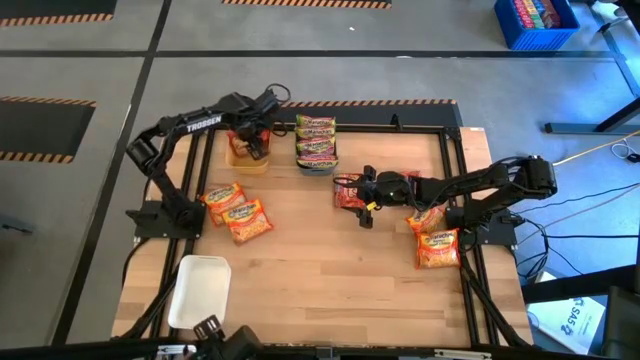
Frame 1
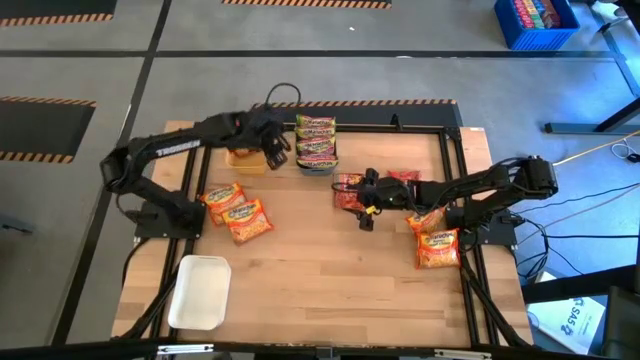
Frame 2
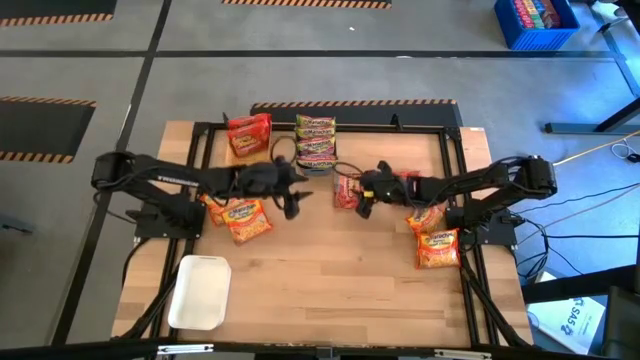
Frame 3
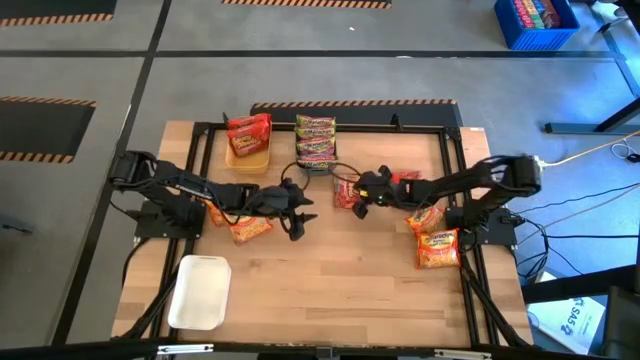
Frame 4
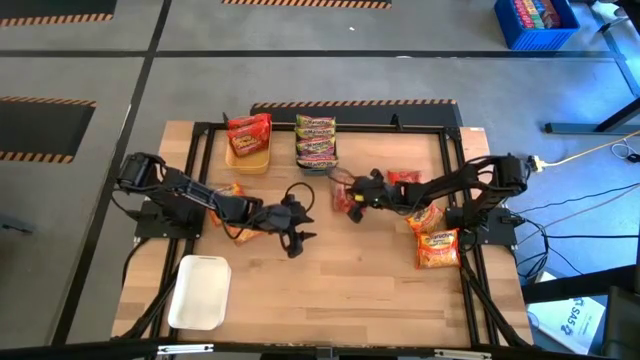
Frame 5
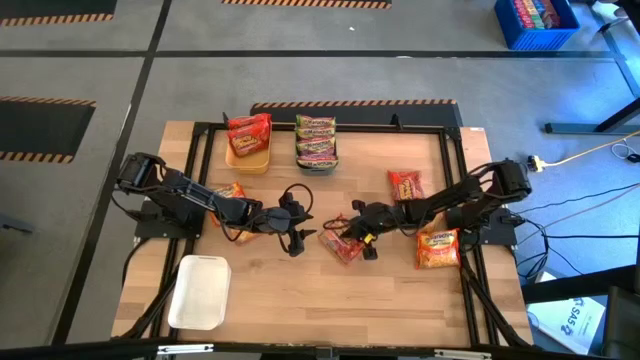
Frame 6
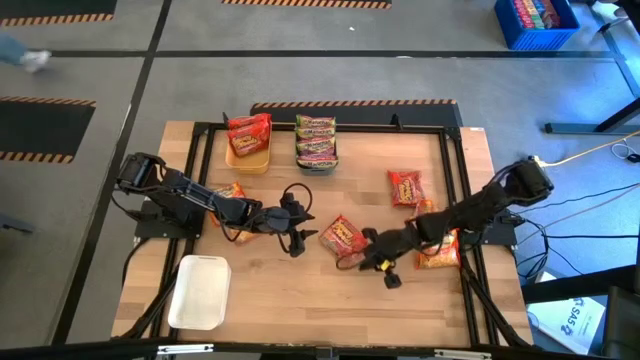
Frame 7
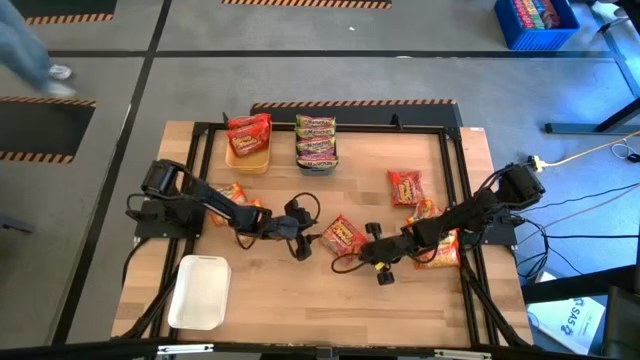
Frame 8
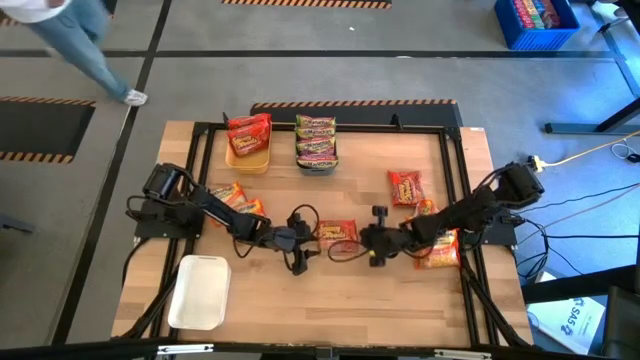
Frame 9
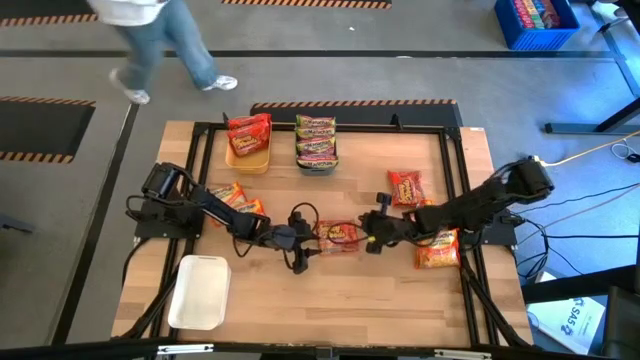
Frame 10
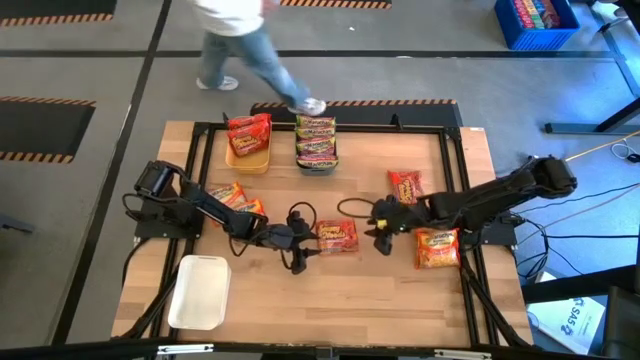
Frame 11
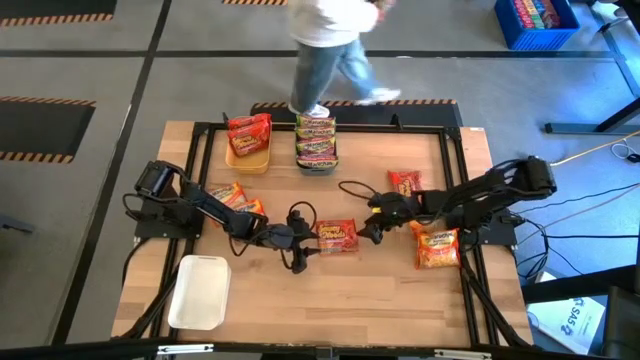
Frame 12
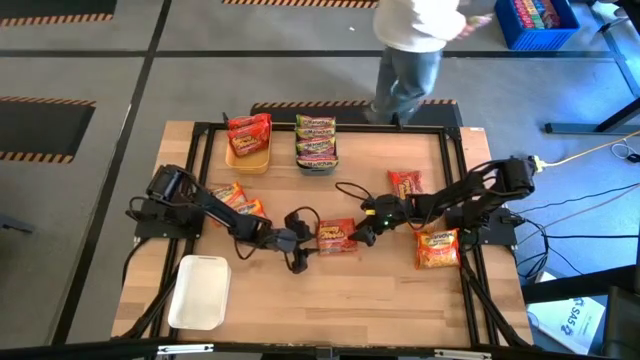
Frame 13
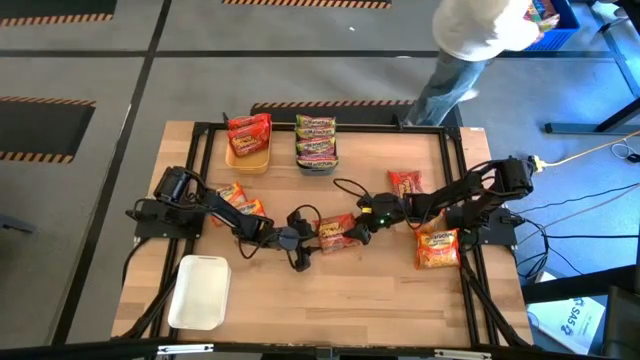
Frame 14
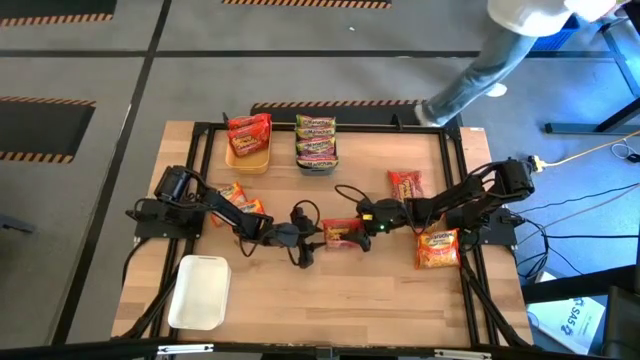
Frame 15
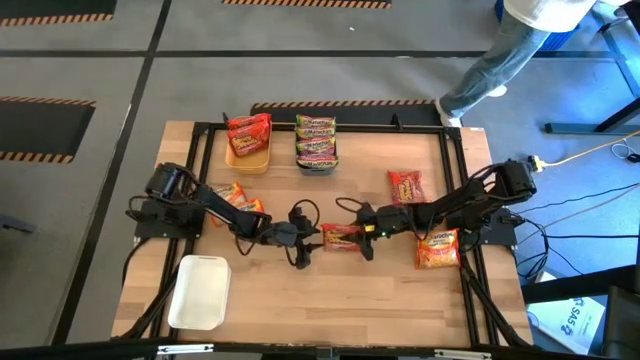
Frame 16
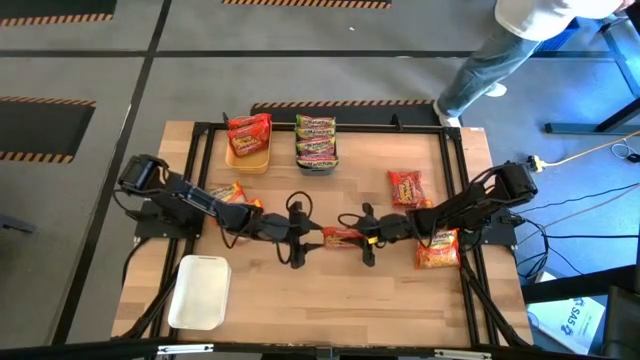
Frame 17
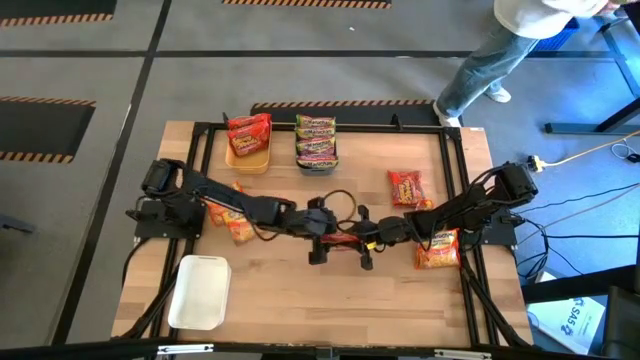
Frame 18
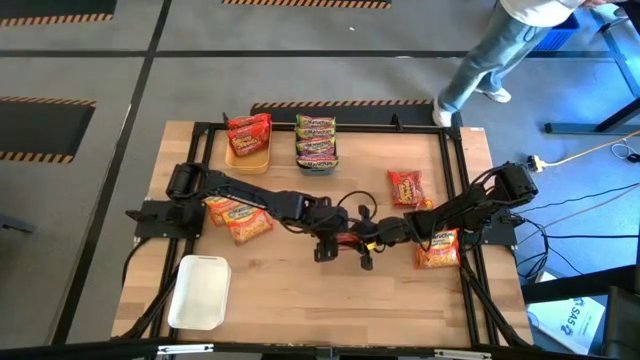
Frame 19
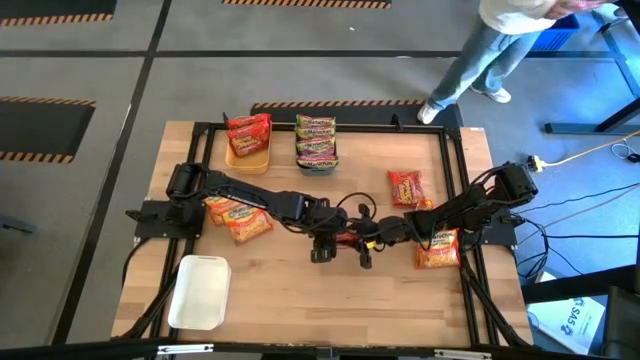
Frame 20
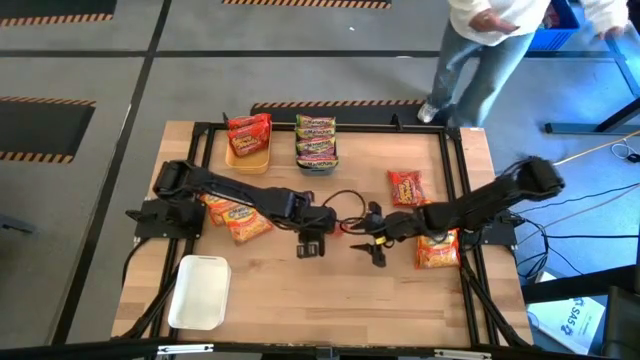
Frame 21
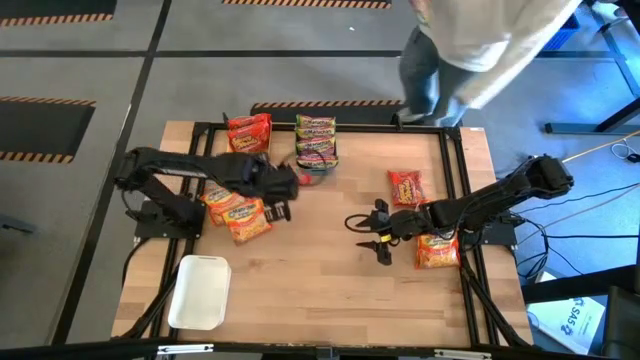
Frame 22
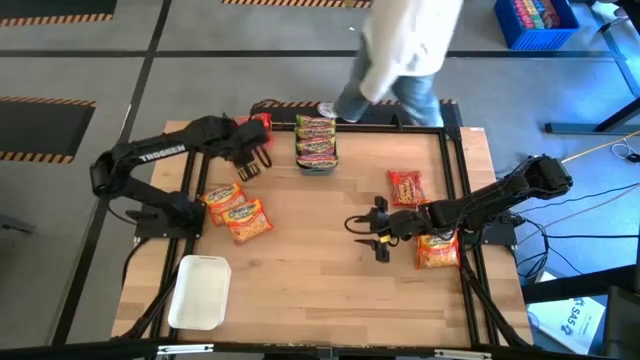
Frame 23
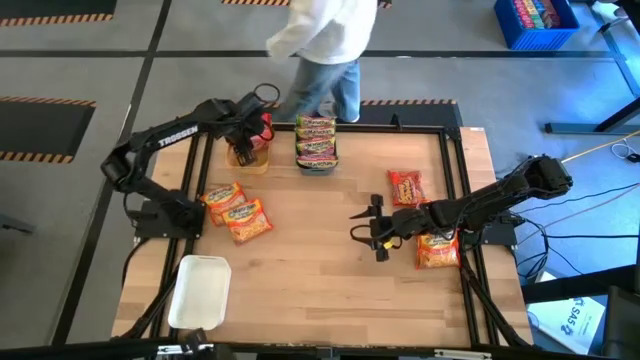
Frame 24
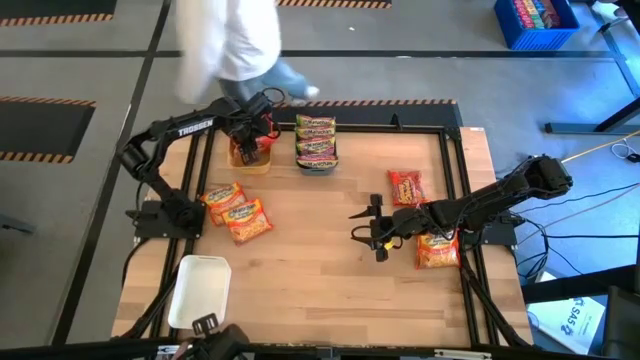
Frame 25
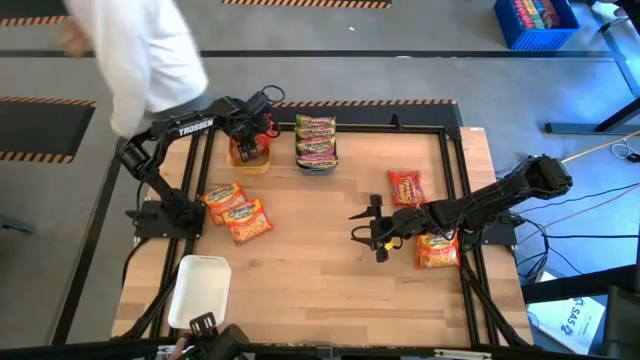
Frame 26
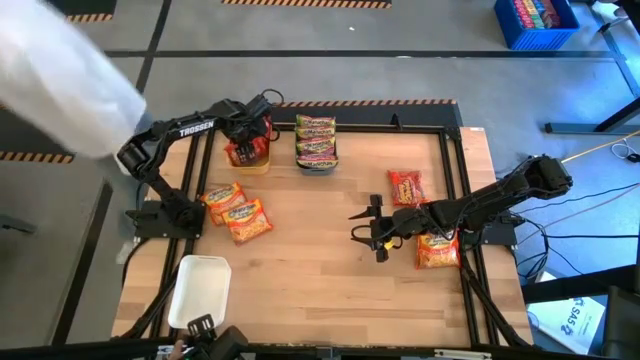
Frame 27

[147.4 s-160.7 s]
Task: Sort Maruchan noodles
Put the orange noodle pack into the yellow bin

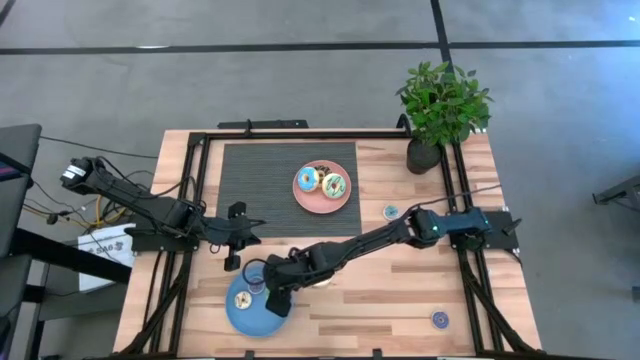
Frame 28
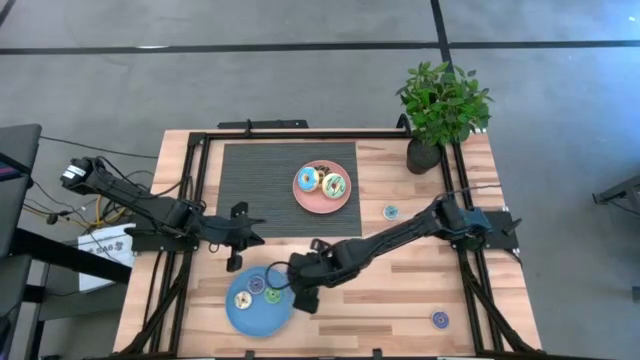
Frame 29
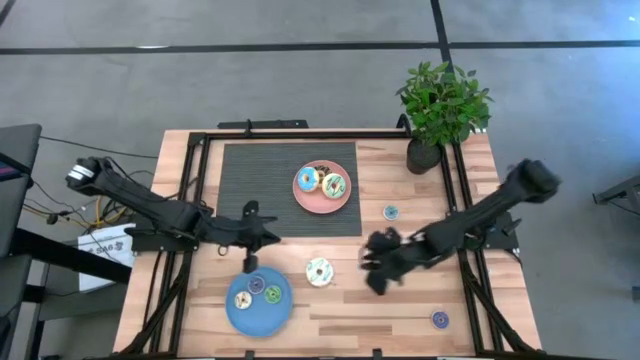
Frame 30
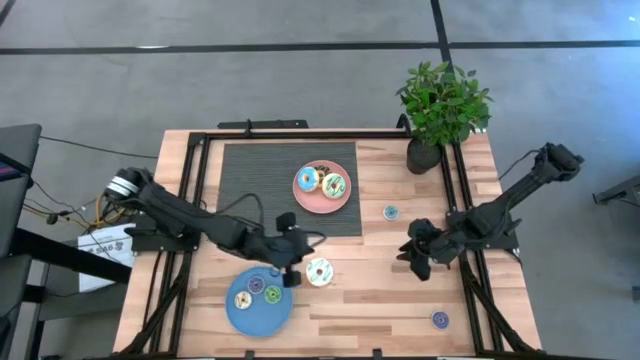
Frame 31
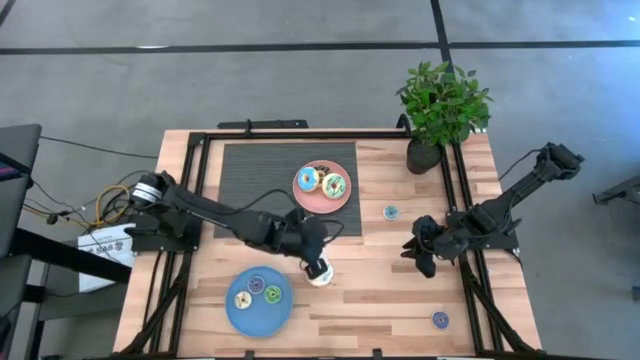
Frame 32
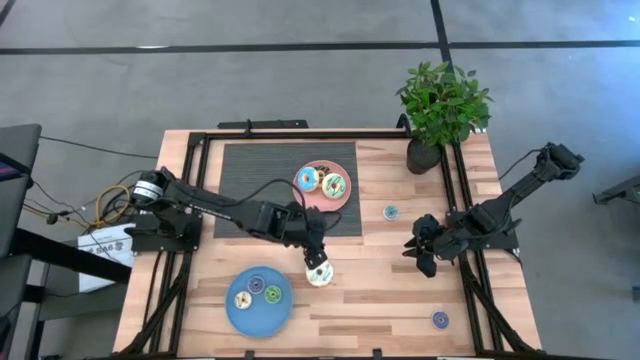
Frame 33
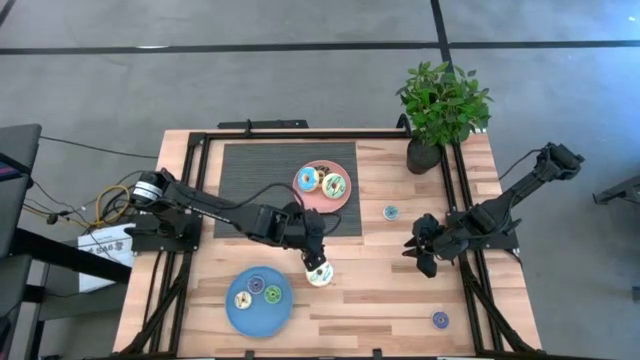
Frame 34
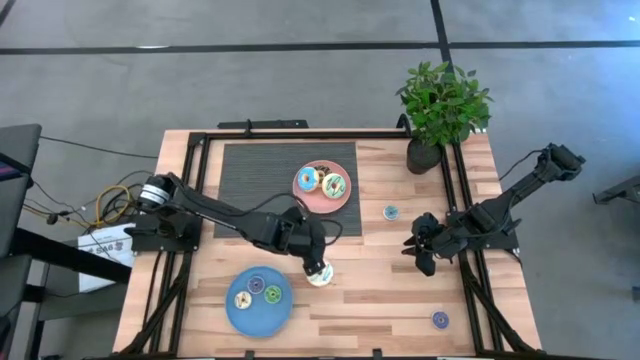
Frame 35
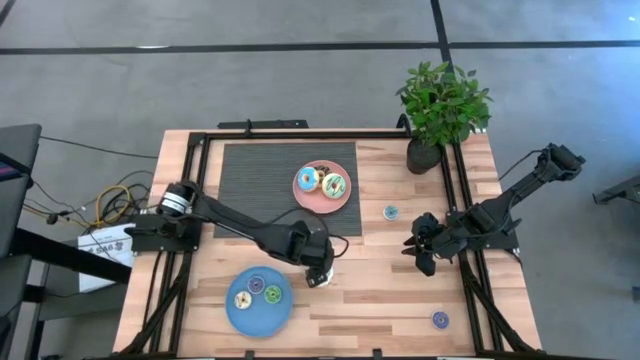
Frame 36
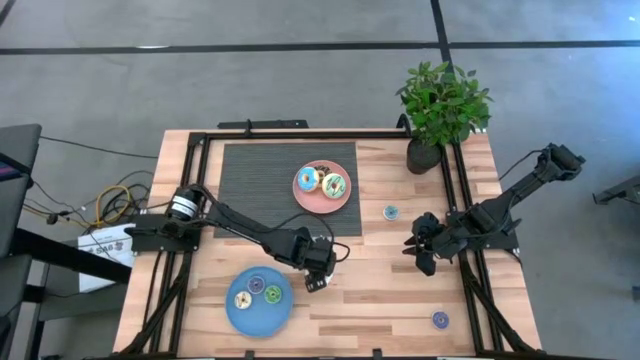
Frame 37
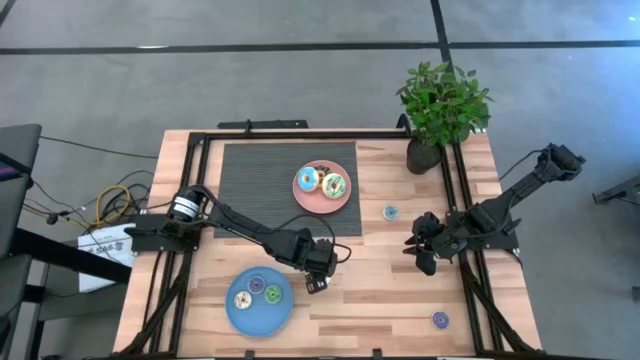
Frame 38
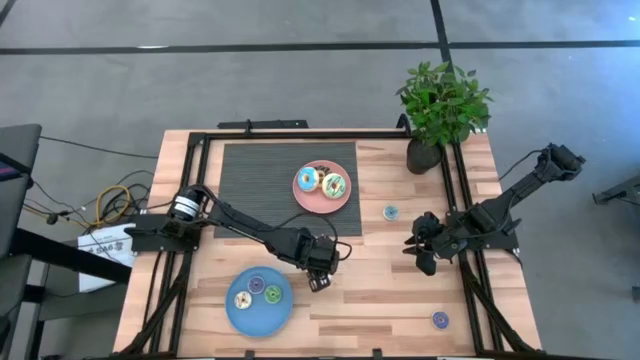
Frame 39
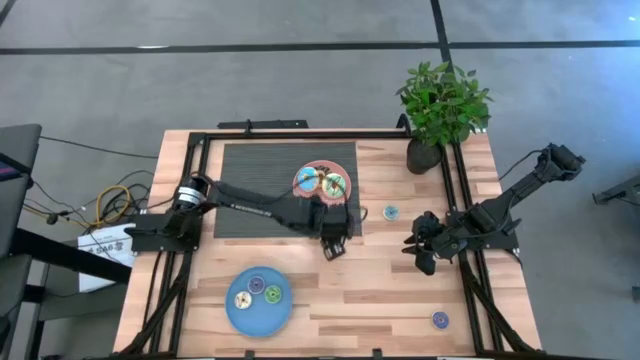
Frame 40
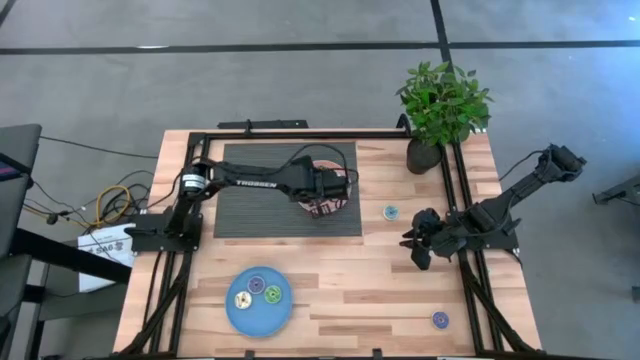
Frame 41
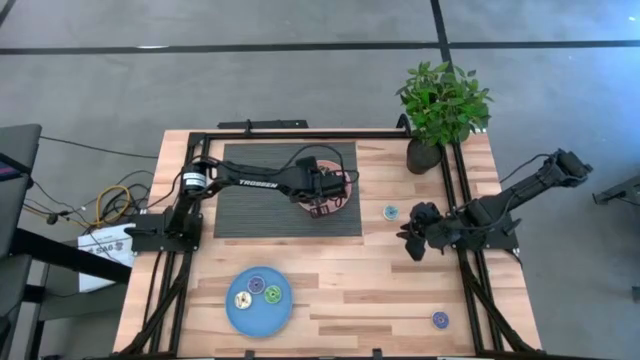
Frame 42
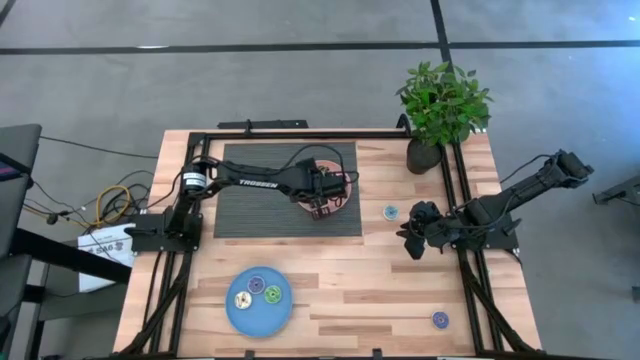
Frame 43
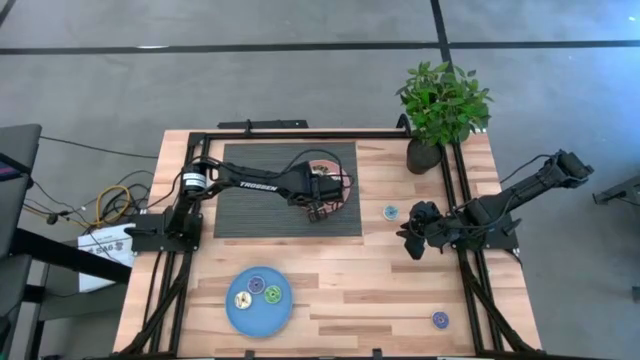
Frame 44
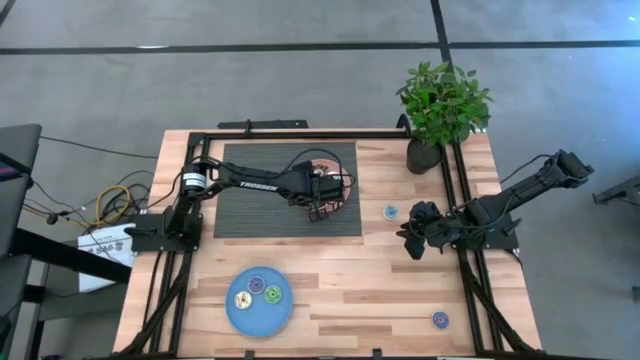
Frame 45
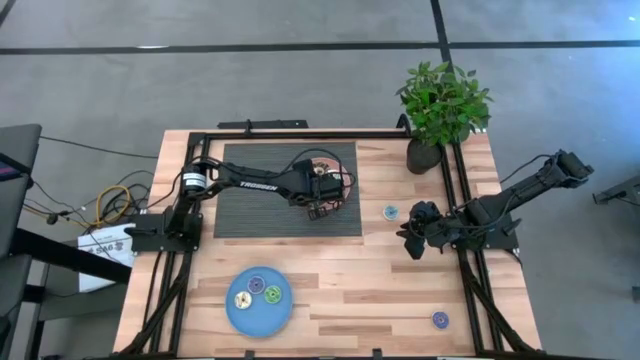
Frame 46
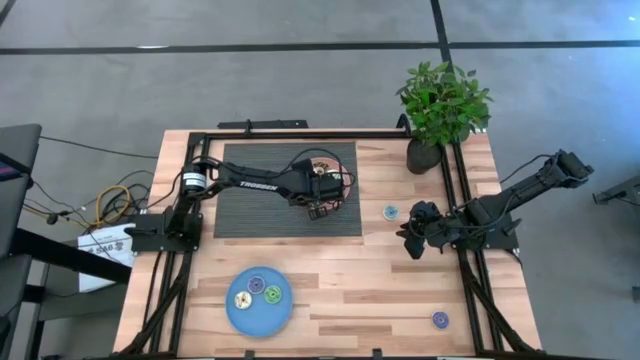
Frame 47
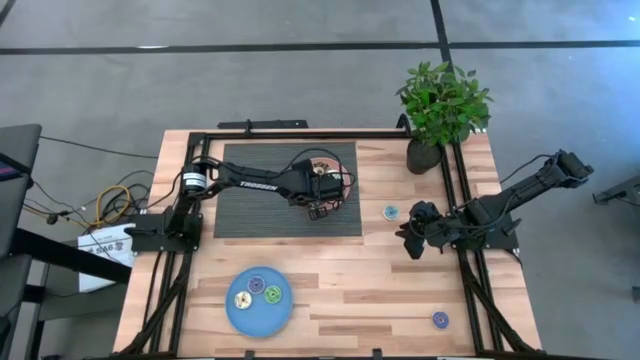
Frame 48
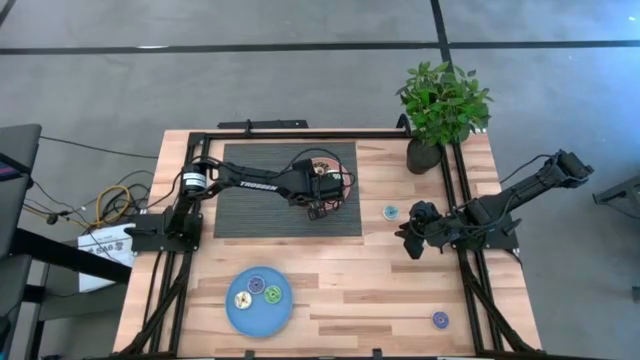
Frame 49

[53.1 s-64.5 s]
Task: Pick & Place donuts
Put the large white donut on the pink plate
